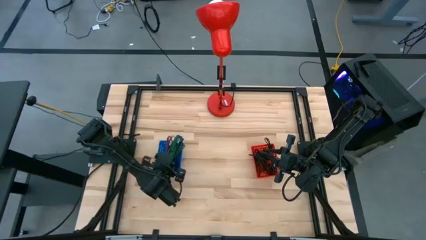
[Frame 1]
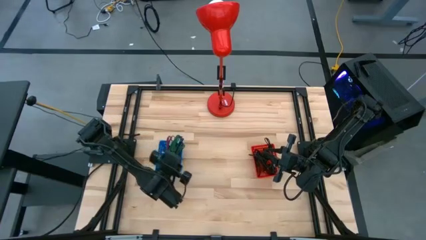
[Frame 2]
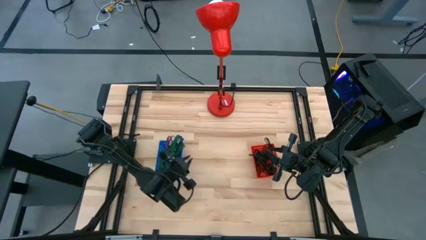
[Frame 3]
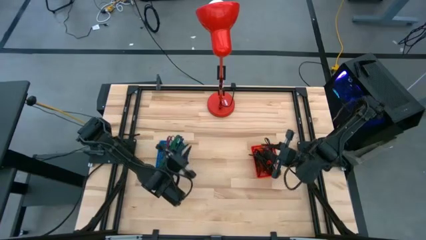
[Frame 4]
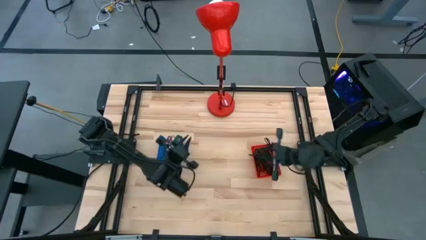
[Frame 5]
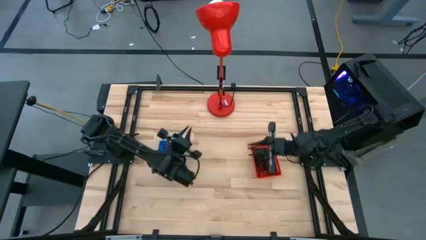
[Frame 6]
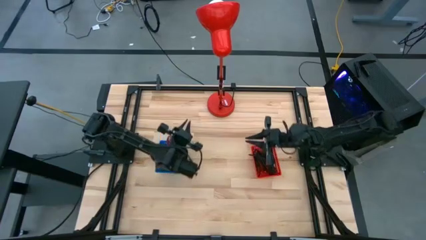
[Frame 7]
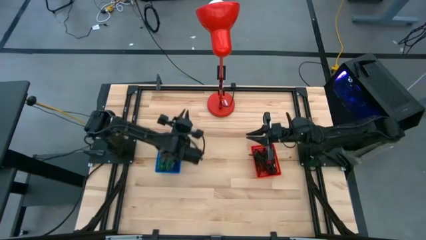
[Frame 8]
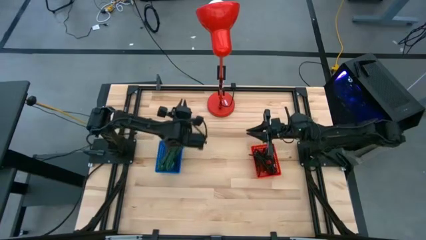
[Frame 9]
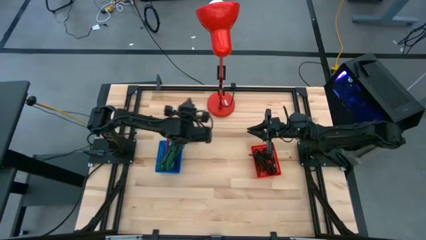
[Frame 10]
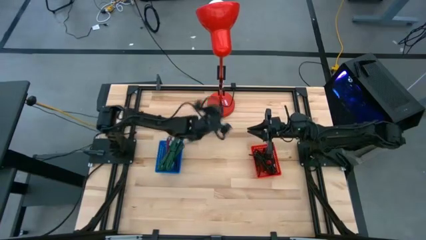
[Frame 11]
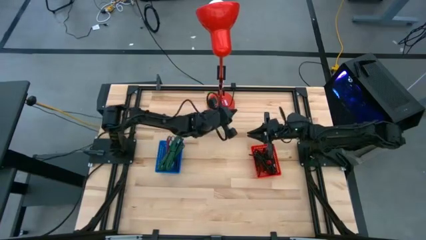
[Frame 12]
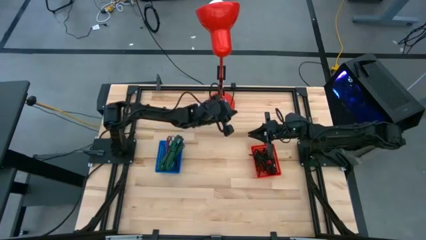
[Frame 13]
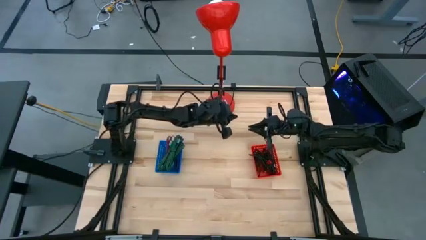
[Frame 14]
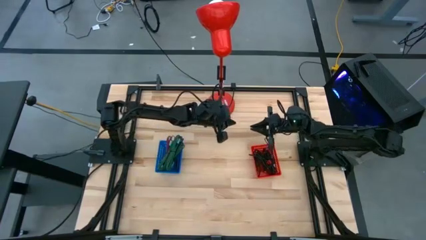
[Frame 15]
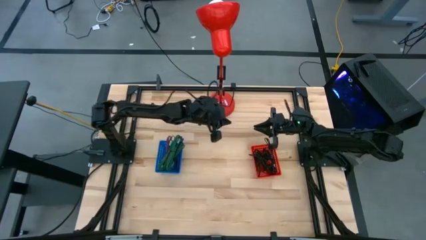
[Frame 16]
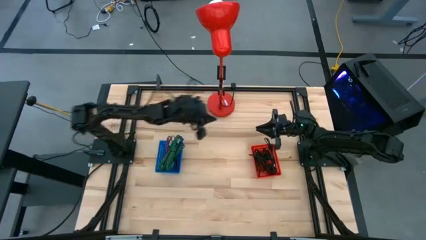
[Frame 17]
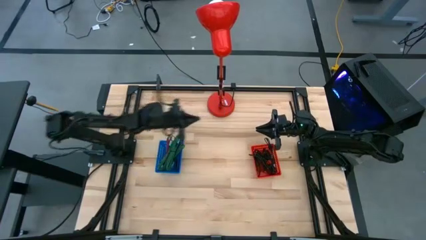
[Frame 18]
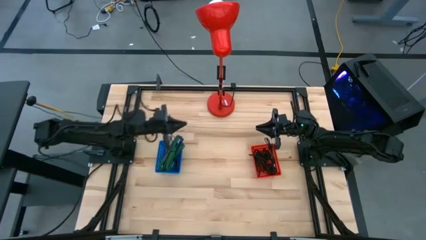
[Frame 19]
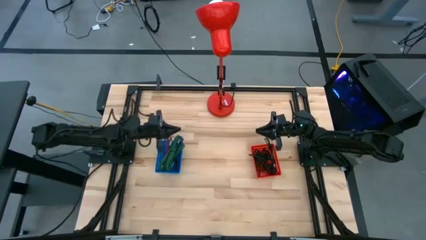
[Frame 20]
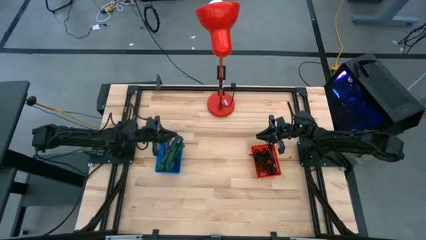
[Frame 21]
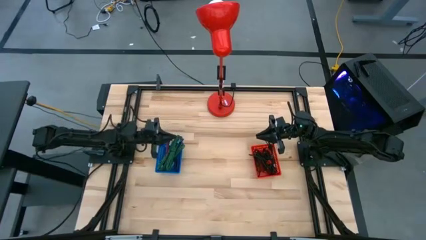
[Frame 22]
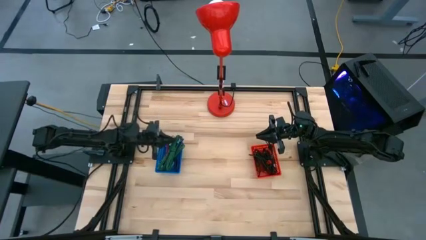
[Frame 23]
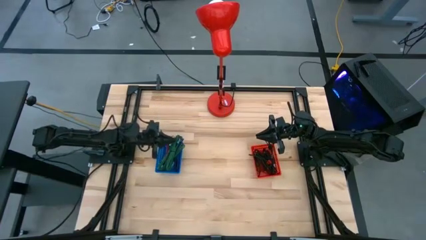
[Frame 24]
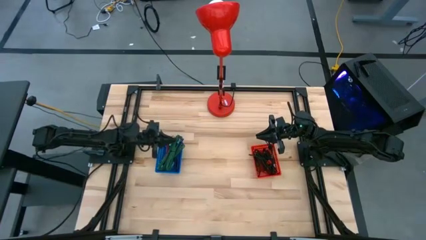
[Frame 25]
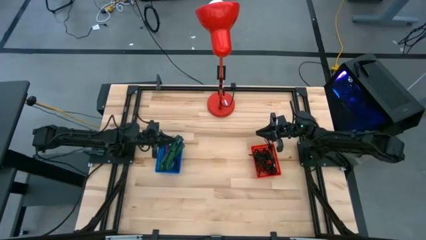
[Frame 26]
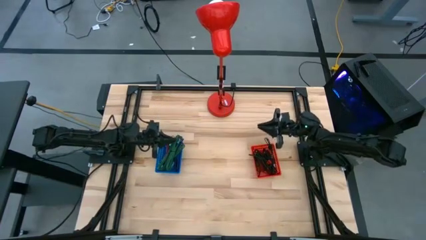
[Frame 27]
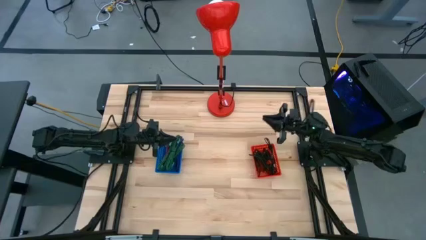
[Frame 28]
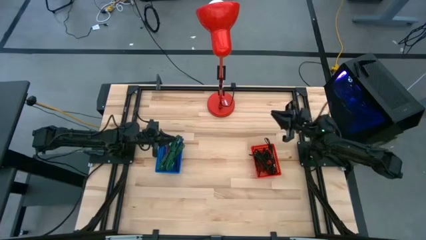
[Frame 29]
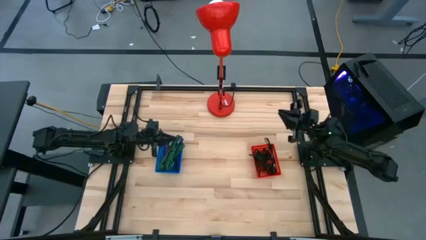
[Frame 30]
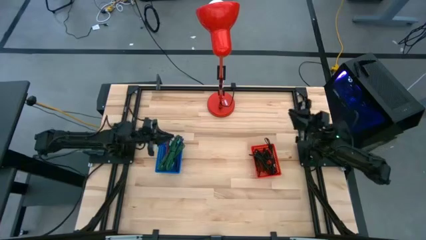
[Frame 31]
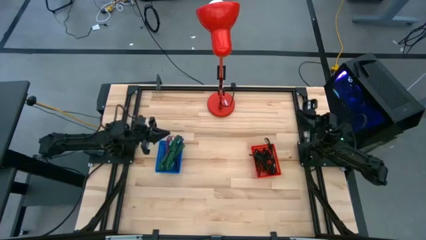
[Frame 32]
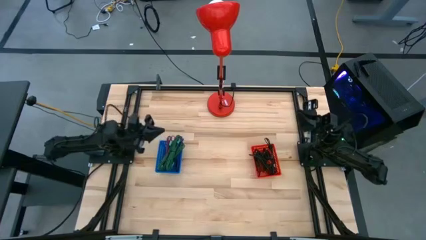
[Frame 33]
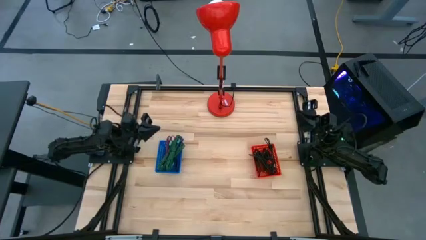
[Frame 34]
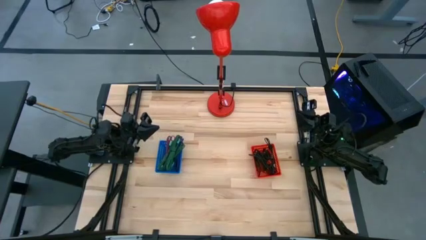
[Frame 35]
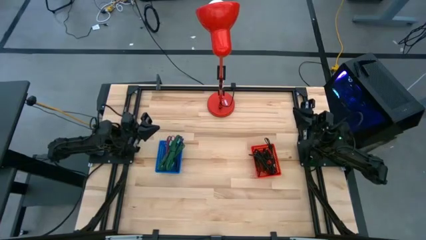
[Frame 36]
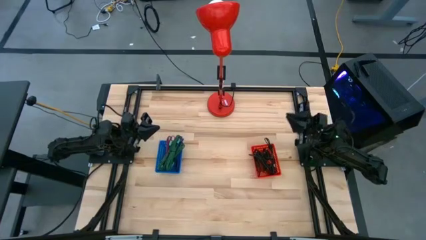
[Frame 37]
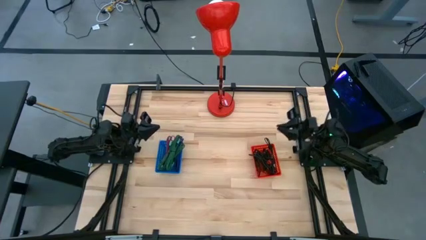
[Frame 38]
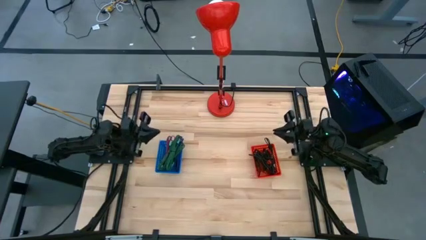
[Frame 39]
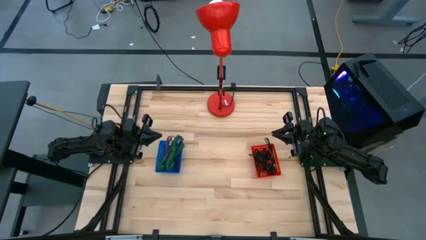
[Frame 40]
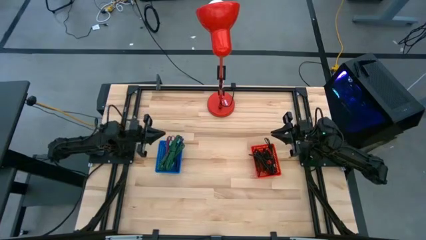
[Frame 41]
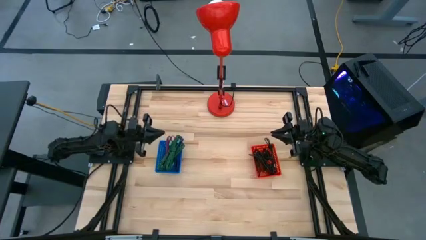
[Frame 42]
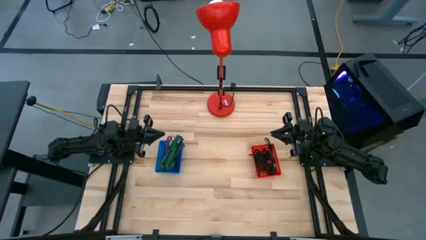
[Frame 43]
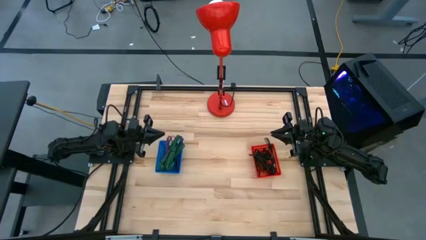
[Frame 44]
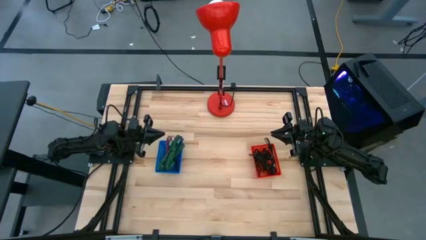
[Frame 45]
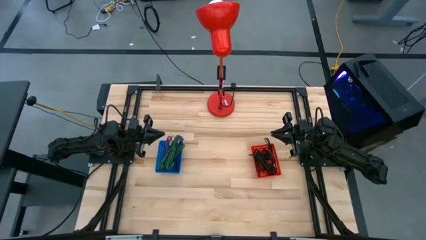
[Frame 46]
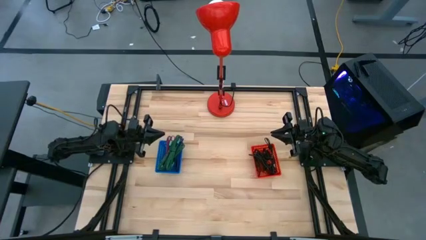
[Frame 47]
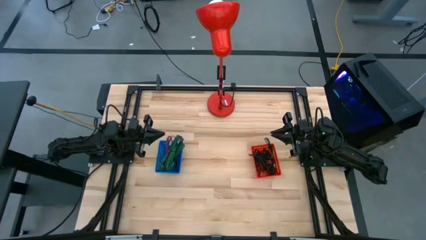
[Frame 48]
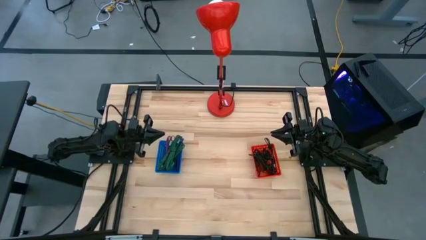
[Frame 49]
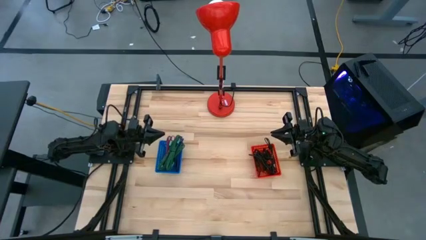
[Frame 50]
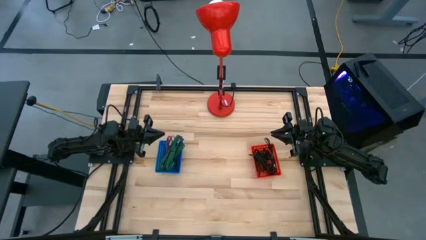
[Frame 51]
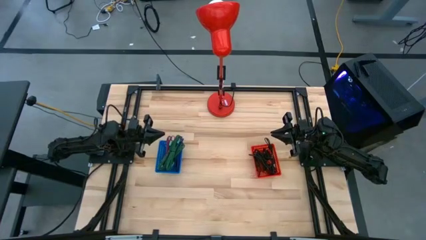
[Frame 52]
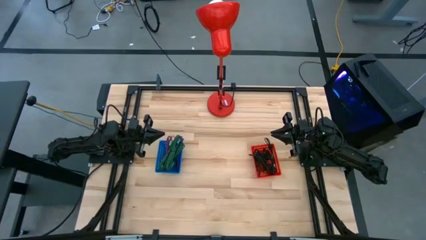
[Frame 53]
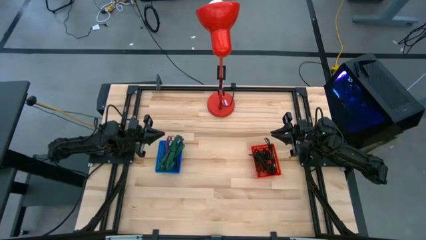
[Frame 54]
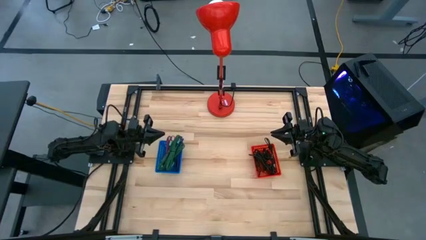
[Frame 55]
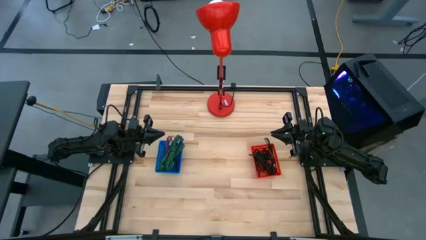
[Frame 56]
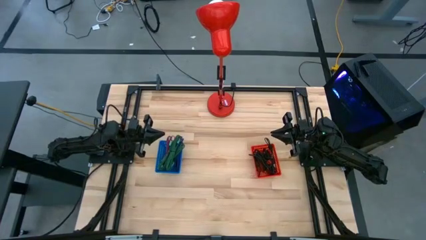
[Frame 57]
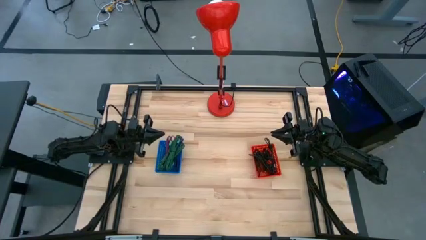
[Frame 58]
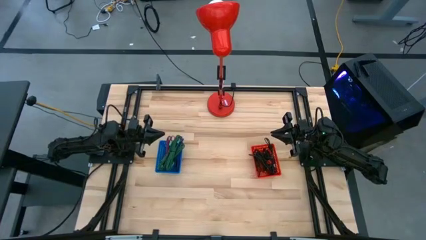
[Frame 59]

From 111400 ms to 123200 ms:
Task: Pick & Place USB Port
Return to Home Position
